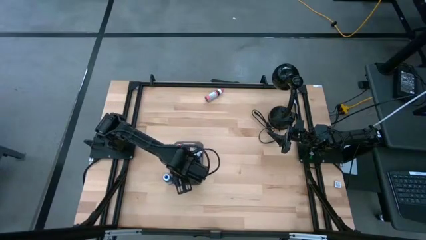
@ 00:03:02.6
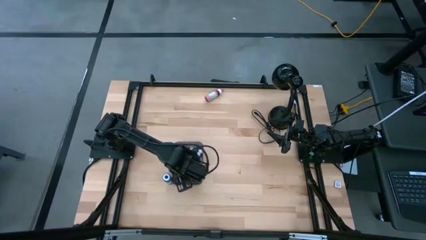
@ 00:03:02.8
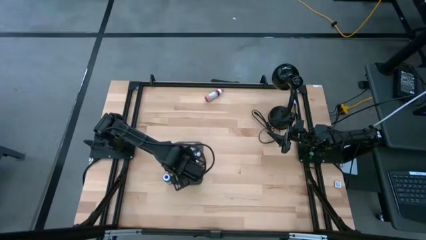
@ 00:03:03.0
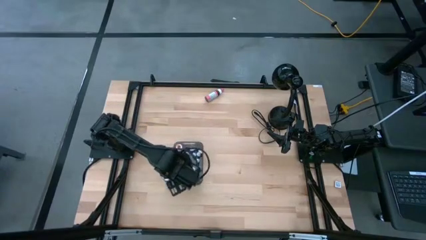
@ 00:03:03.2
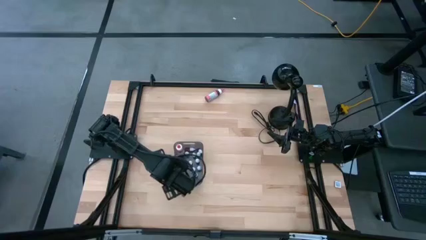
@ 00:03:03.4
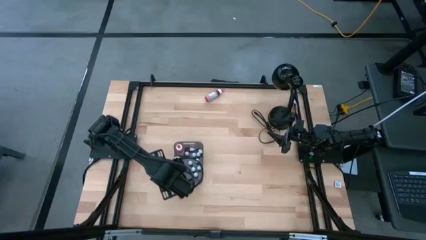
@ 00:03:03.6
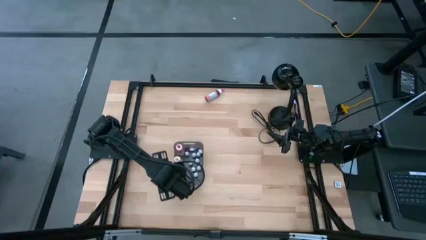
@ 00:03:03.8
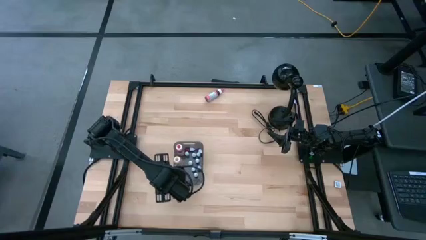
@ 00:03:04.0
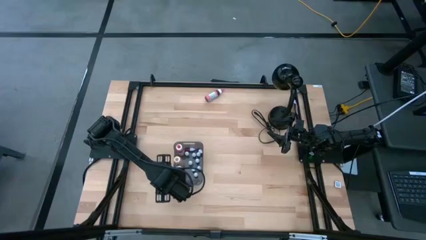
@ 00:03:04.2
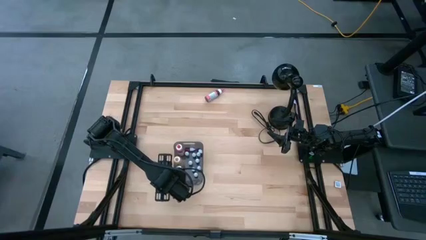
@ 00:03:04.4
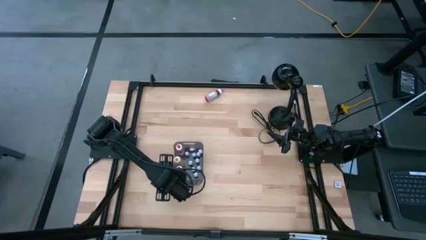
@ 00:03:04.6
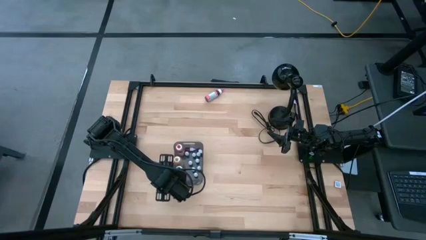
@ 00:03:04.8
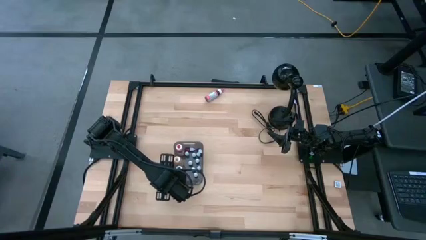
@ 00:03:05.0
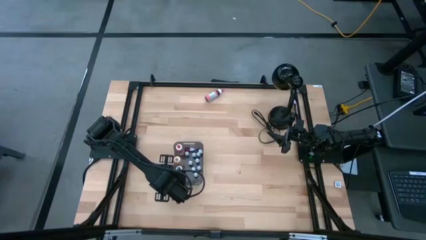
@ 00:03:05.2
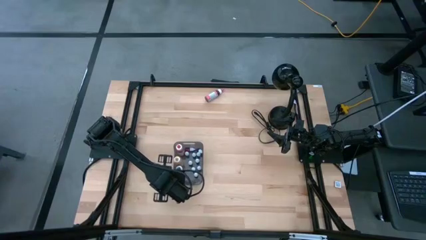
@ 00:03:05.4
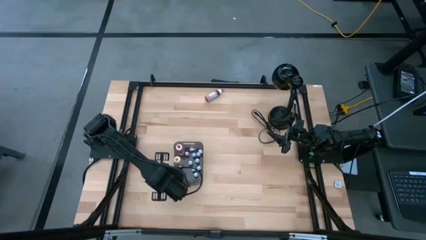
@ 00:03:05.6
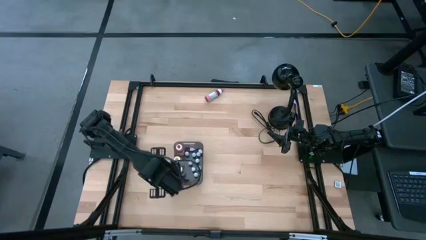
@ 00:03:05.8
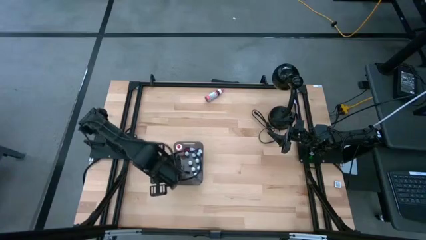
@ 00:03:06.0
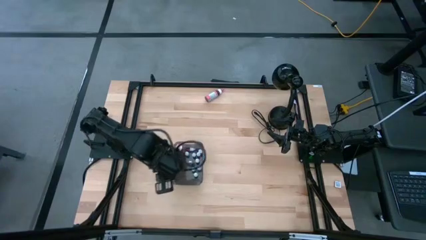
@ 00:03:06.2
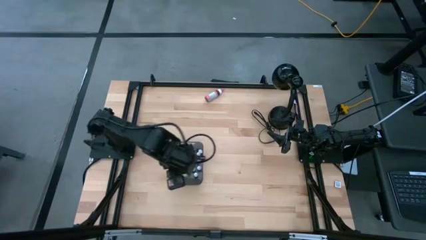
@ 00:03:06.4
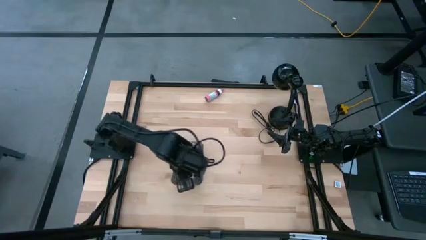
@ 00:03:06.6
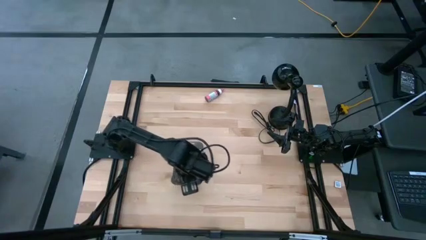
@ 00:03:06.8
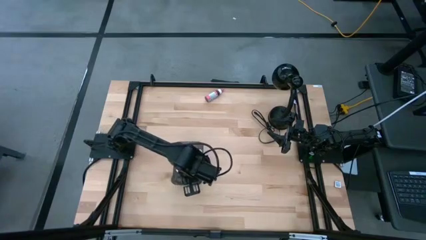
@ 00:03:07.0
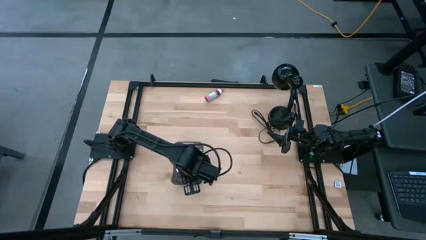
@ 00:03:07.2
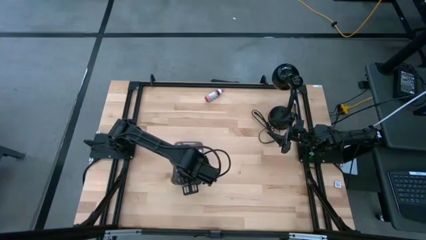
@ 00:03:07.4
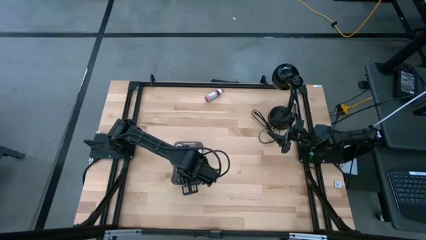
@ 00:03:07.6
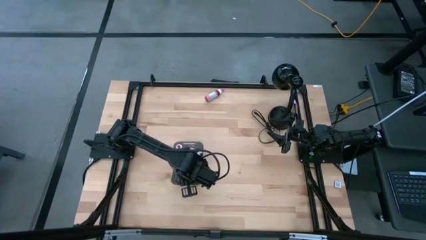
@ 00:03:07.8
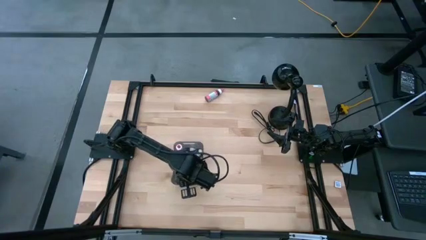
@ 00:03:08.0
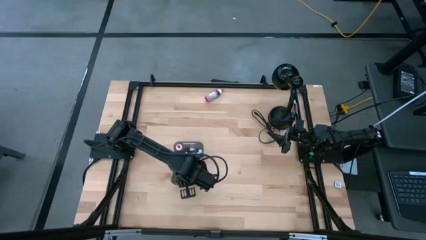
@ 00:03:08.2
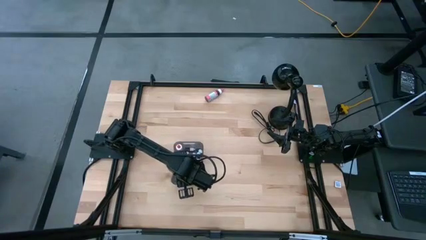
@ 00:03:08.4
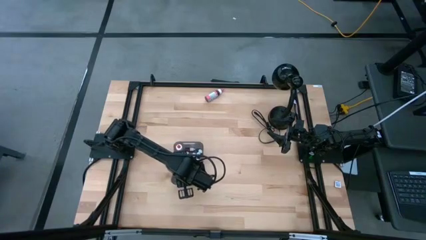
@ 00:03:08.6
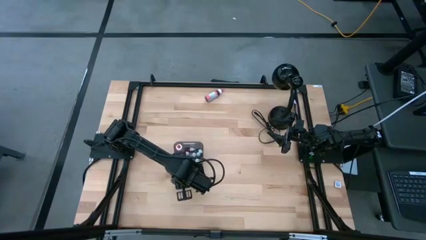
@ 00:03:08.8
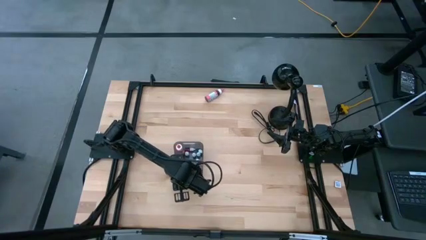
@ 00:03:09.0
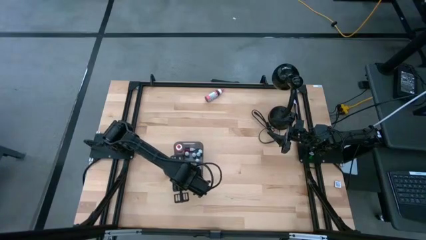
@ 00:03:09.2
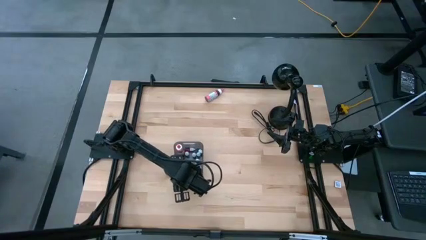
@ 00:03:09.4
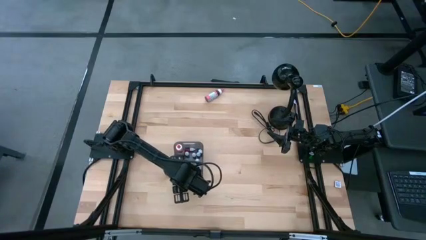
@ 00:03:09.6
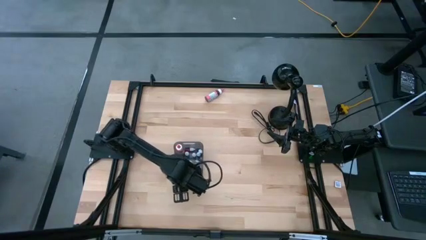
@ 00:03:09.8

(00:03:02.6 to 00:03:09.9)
Task: Pick & Place food coloring
Put the dark blue food coloring bottle into the bin
